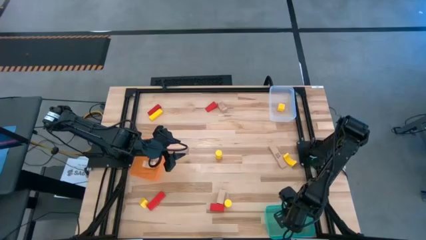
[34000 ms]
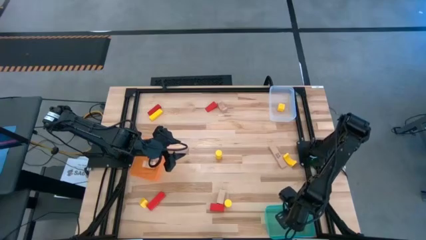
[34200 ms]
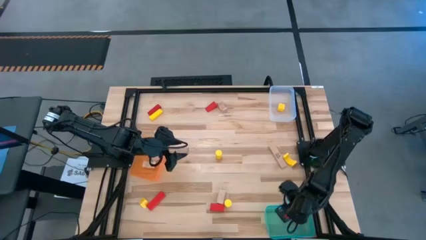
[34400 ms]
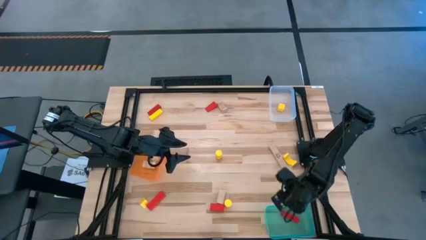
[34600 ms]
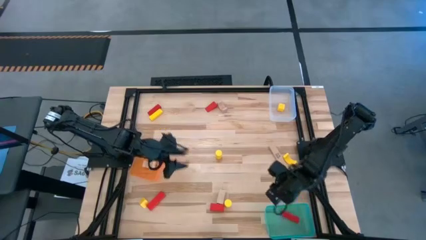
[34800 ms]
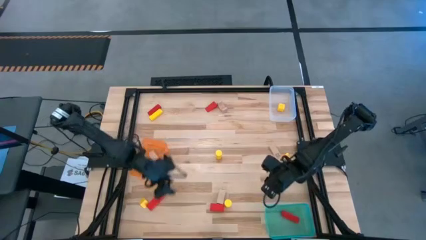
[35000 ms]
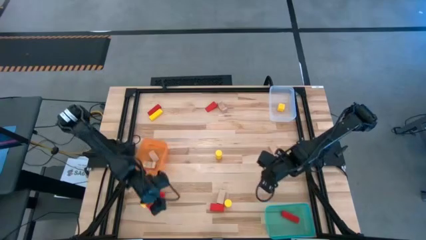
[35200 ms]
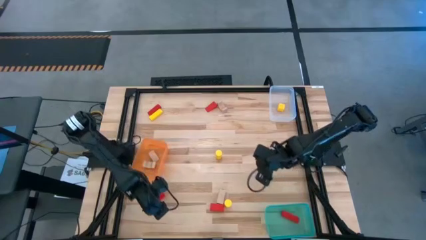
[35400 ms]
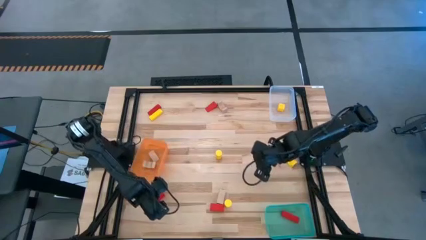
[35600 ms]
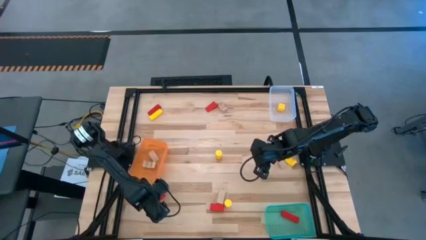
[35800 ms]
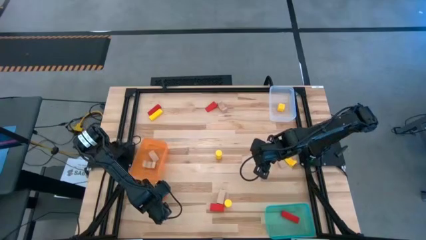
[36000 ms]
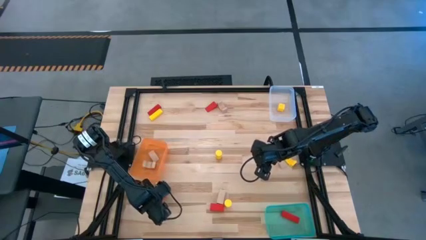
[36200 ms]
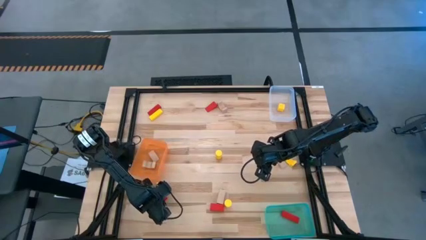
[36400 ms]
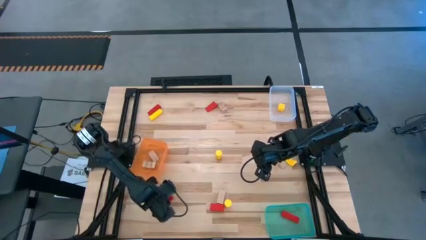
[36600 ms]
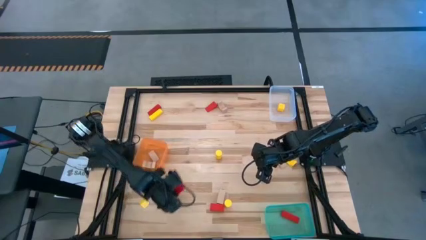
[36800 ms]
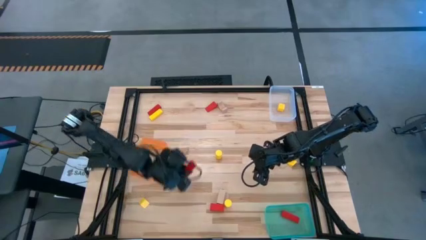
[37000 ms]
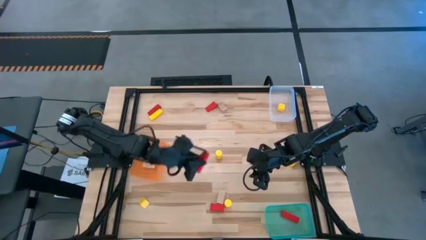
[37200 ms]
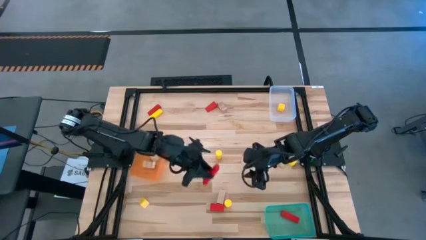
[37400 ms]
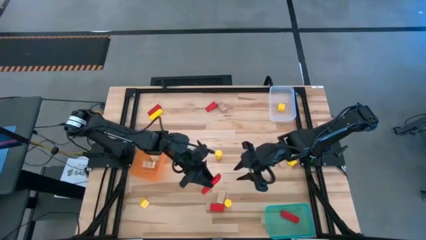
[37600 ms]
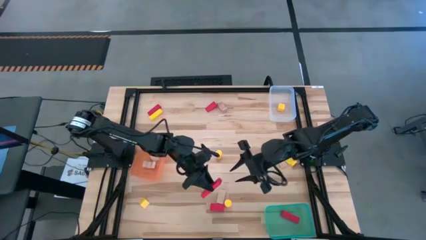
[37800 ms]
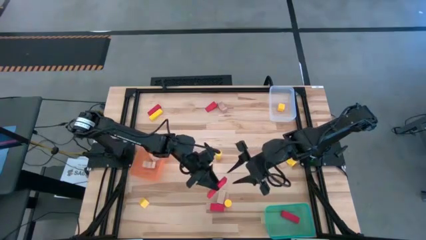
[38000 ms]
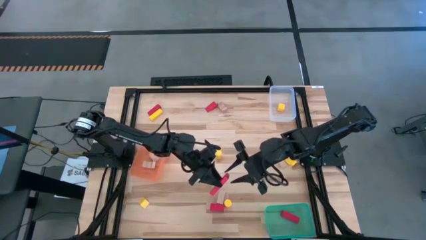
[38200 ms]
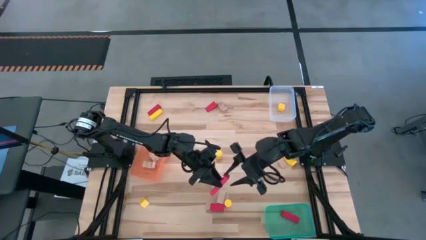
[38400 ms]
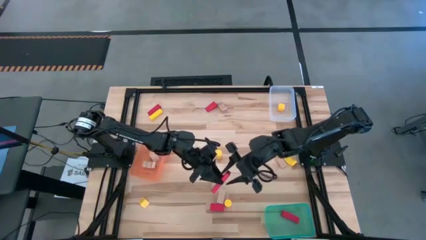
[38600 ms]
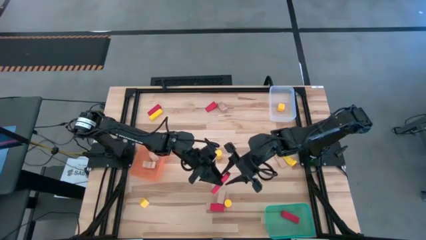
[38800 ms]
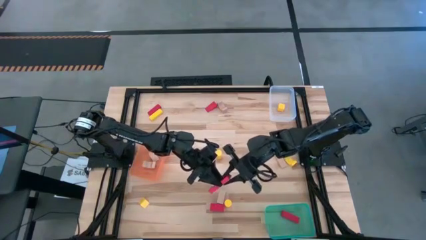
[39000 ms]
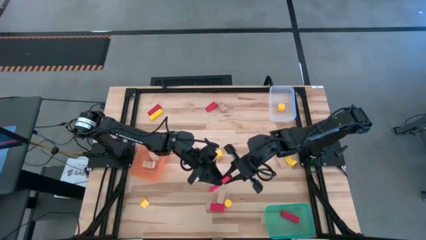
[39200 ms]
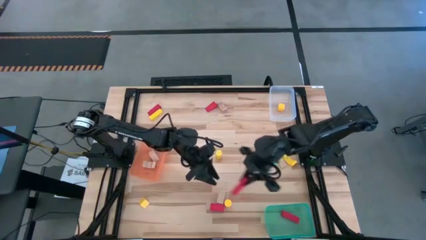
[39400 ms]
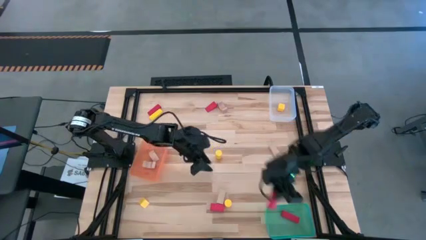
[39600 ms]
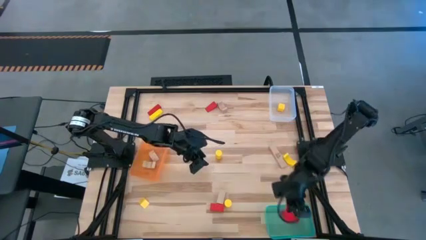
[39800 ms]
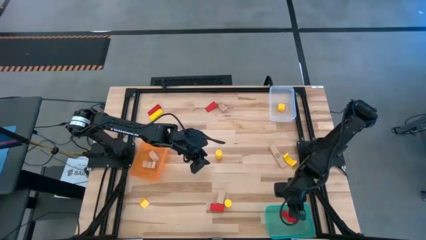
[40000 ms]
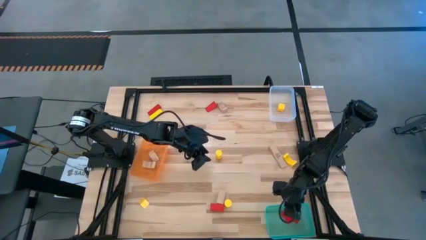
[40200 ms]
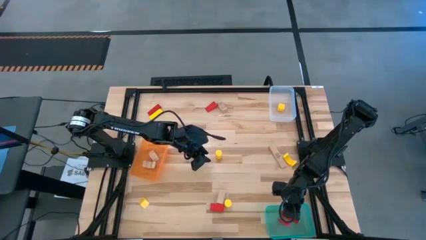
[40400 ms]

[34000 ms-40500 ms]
Task: Sort & place blocks by color
Put the red block into the green bin

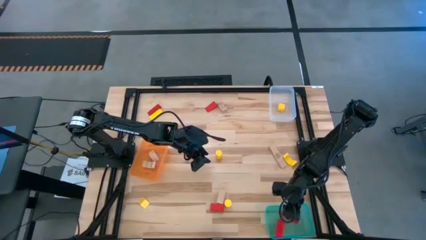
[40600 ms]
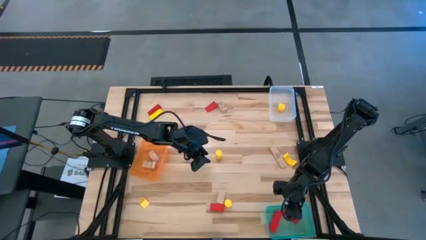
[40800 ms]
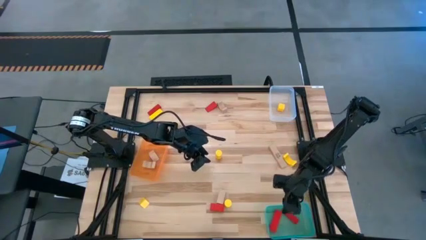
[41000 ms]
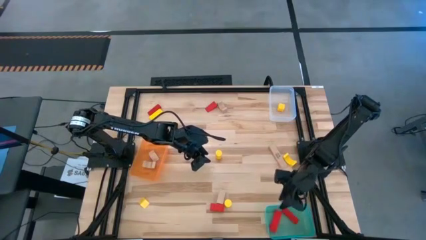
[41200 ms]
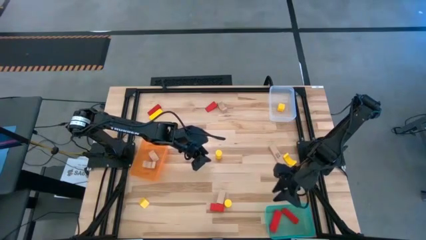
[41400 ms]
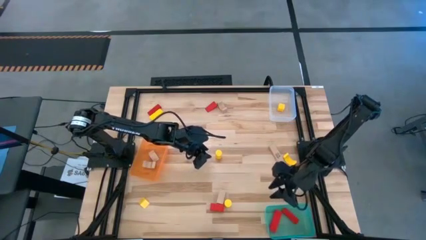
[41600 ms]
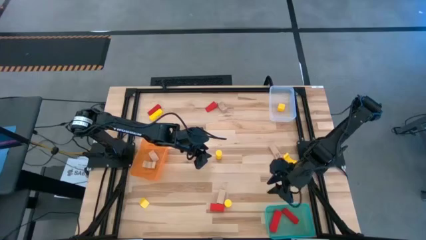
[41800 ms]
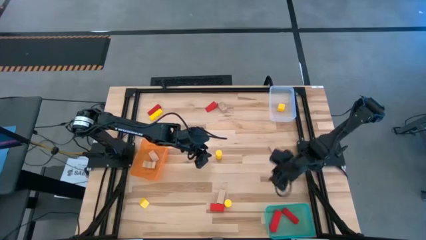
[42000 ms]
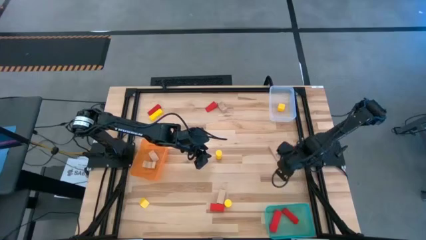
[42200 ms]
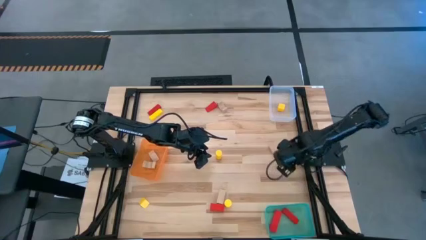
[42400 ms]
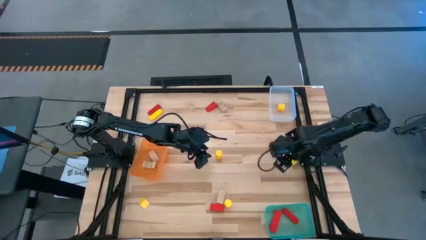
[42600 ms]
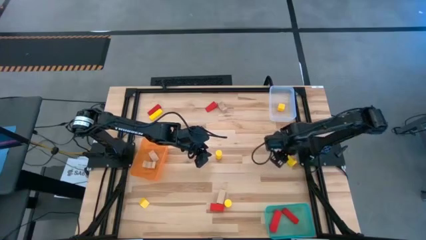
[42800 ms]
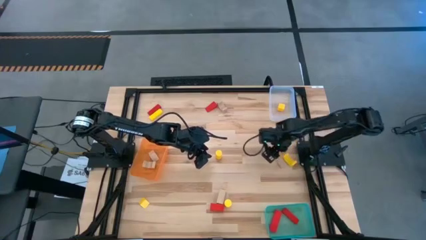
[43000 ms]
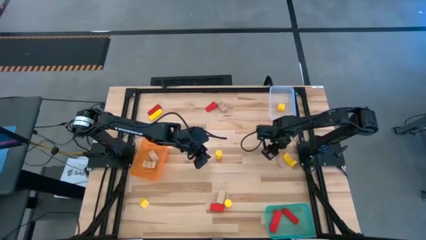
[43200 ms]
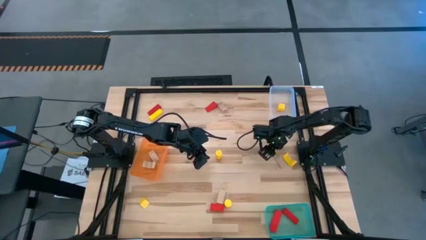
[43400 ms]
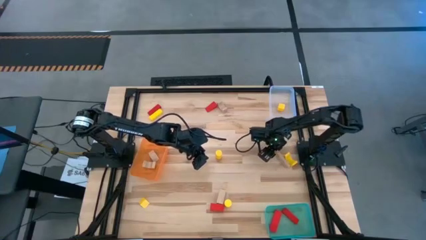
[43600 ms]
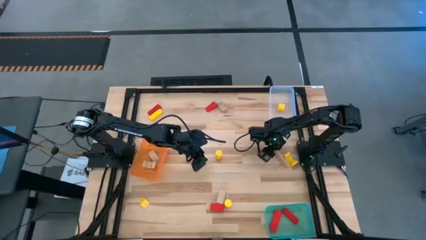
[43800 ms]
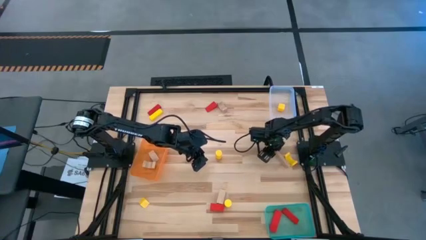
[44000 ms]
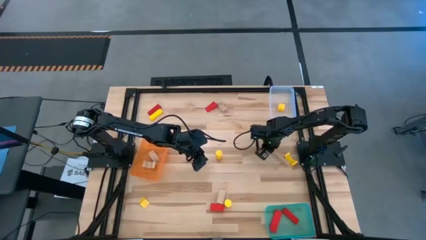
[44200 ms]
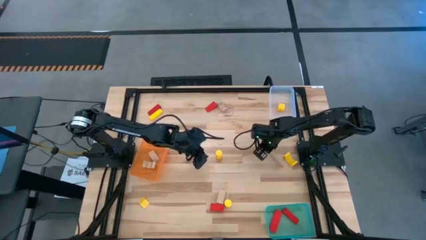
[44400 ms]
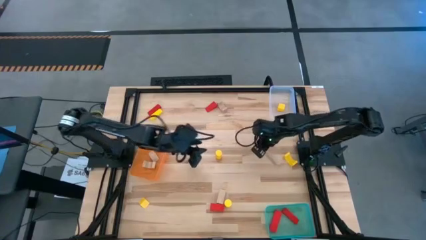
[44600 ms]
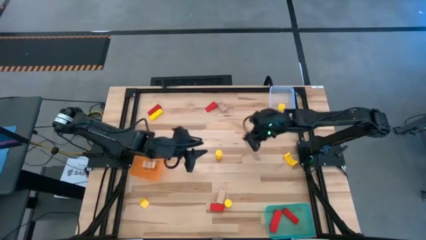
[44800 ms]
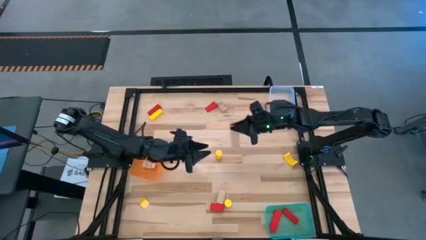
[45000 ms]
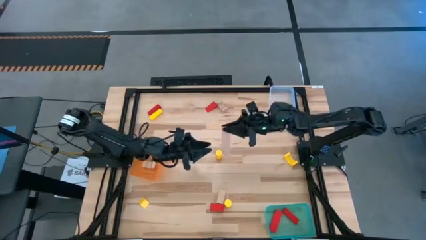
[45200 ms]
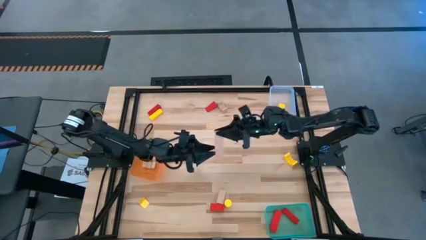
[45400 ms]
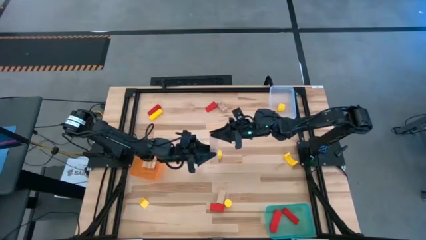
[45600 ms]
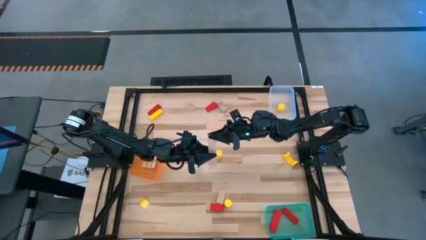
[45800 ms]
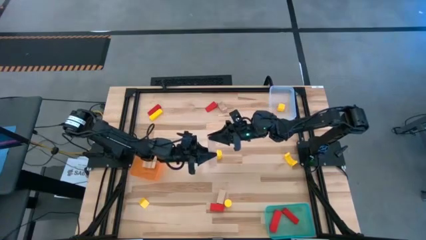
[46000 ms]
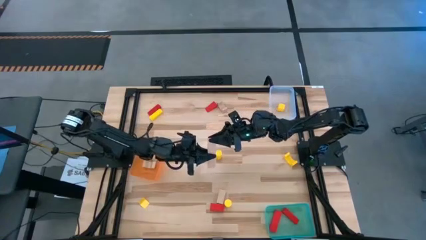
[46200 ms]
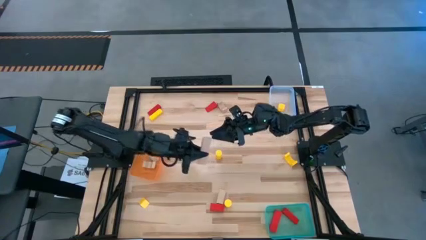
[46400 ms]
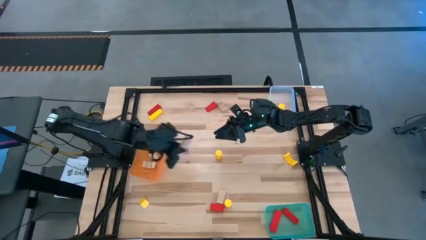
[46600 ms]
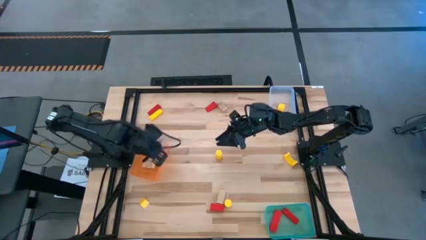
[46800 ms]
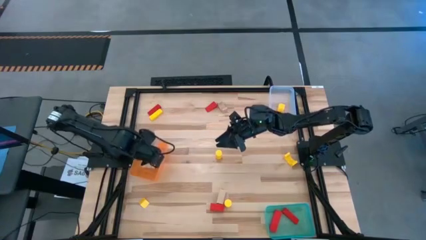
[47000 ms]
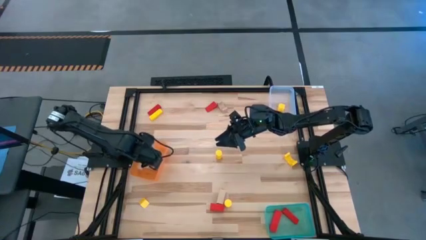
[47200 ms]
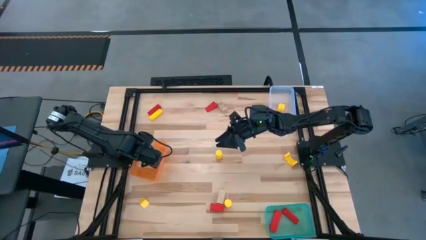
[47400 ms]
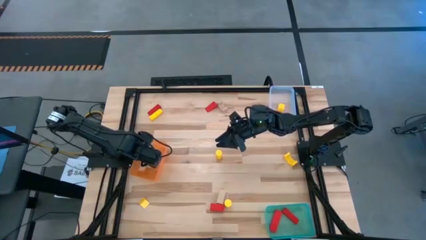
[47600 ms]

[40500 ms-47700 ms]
Put the brown block into the orange bin

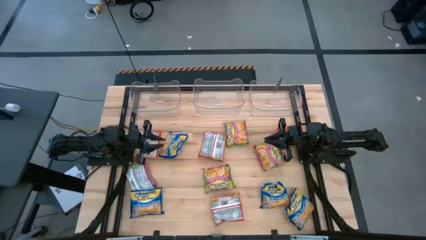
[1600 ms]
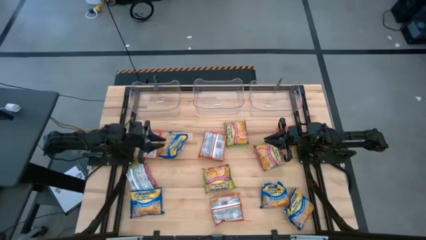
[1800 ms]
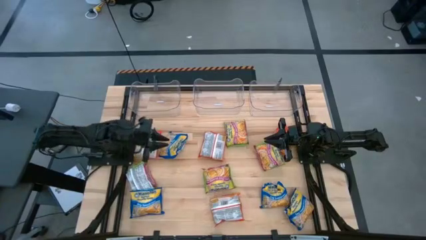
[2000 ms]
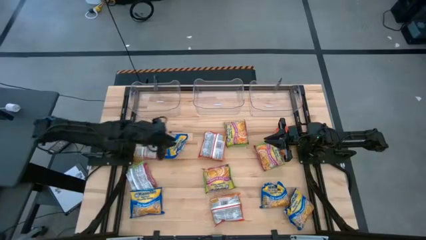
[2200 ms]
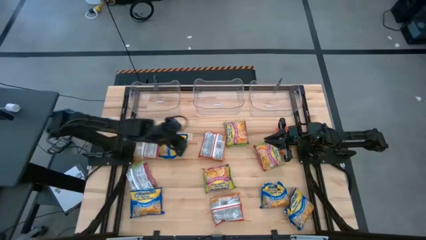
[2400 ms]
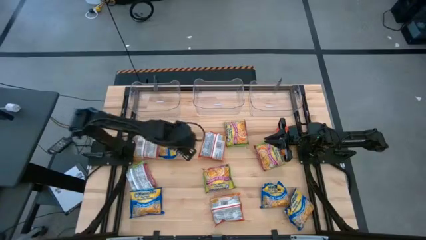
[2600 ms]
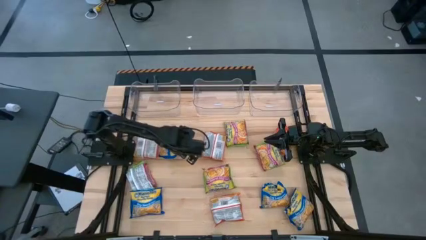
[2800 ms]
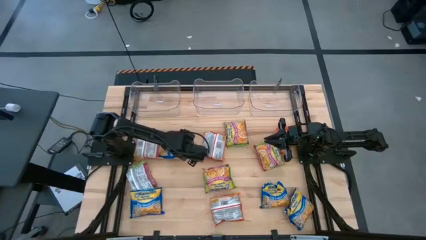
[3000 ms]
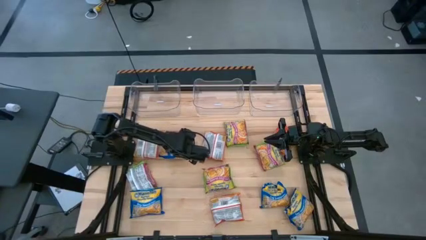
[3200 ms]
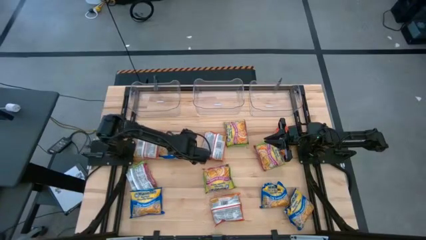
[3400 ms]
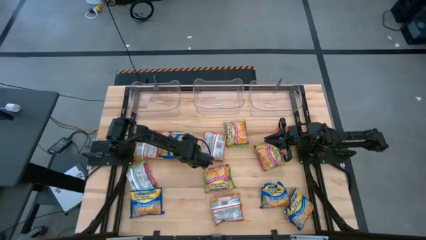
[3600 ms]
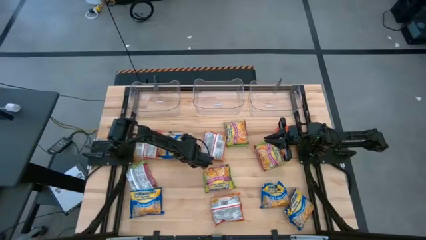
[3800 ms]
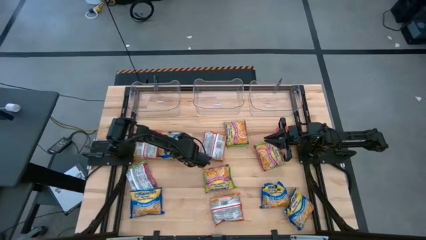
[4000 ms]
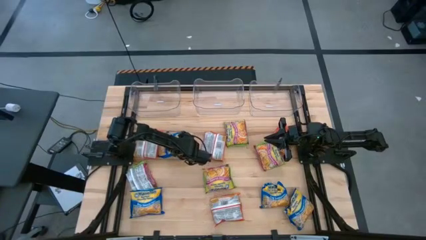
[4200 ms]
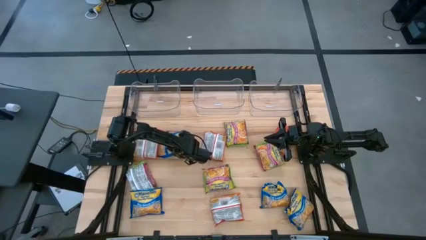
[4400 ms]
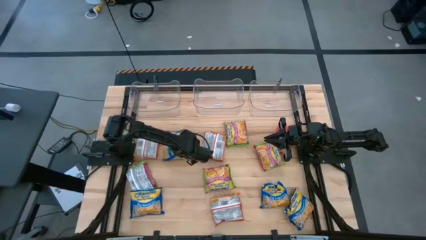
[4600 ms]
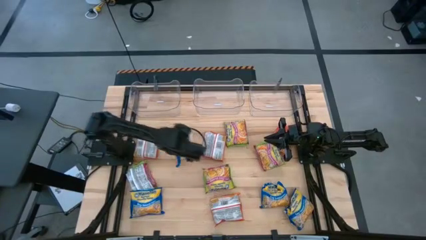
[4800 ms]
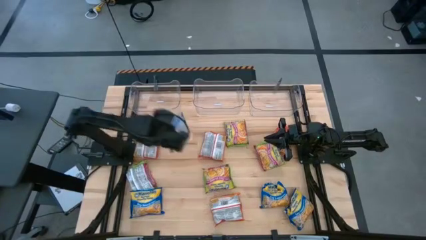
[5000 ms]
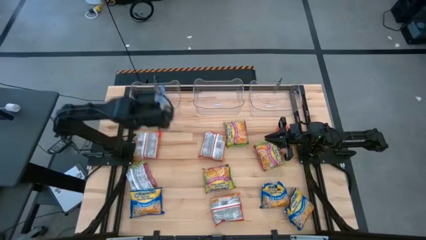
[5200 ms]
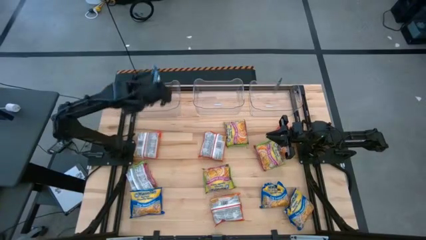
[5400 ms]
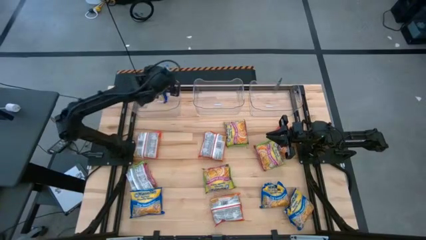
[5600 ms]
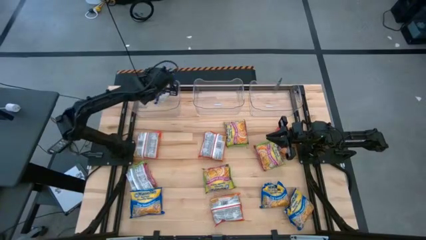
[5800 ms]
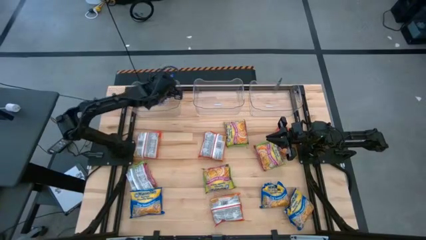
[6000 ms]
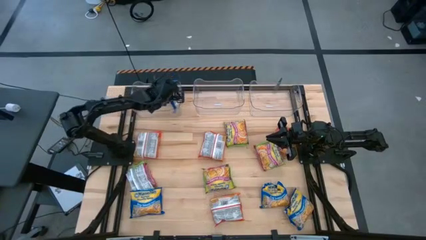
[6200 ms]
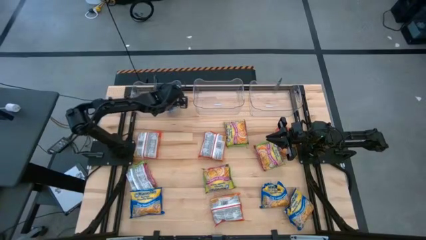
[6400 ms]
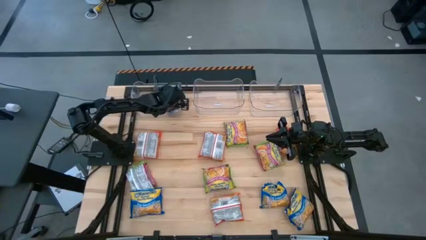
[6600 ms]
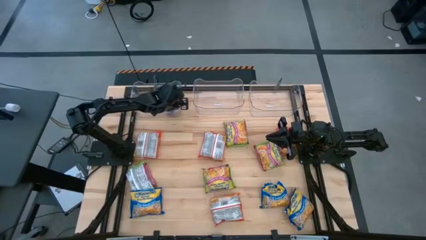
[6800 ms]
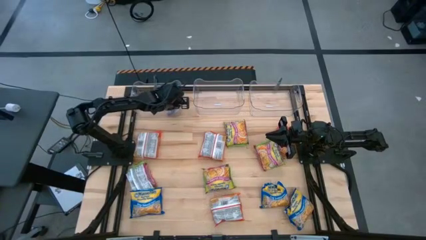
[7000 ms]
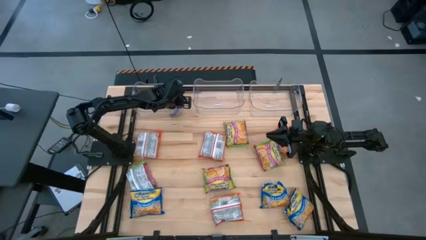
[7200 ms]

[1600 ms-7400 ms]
Task: Sort Maruchan noodles
Put the blue noodle pack into the left transparent bin
